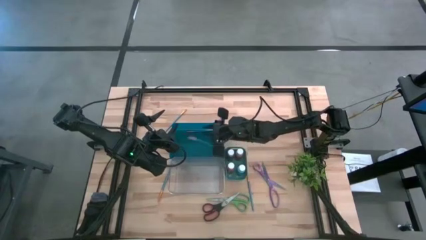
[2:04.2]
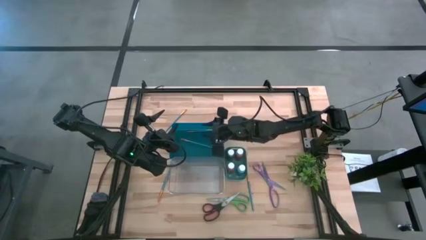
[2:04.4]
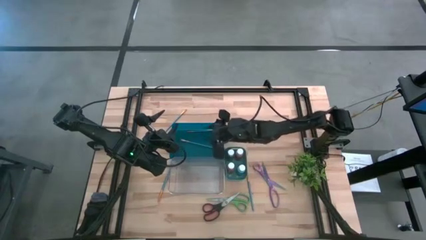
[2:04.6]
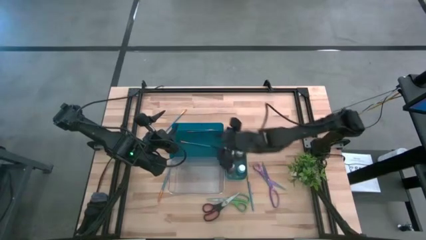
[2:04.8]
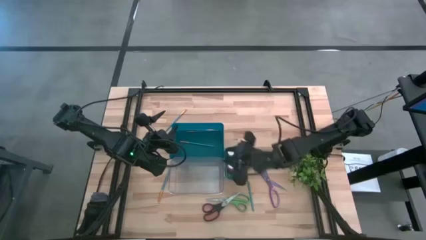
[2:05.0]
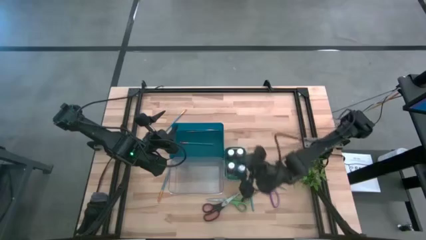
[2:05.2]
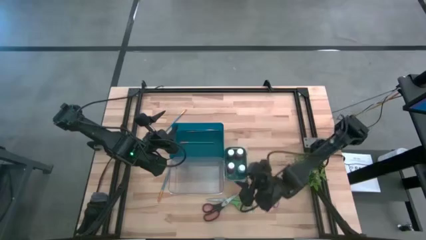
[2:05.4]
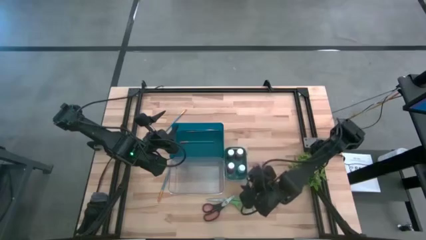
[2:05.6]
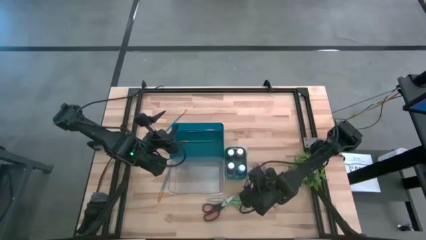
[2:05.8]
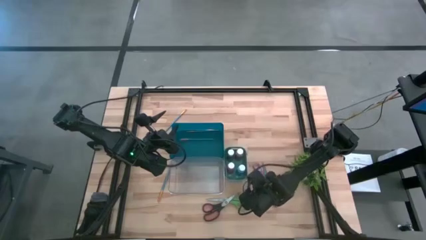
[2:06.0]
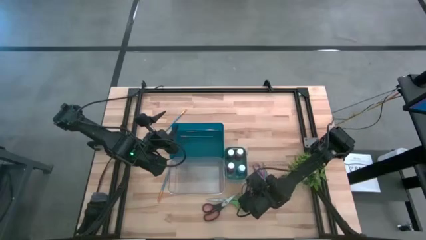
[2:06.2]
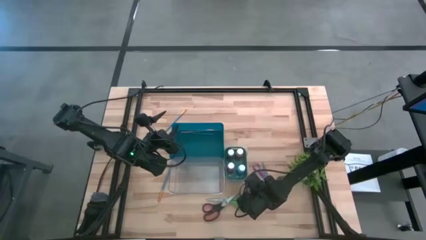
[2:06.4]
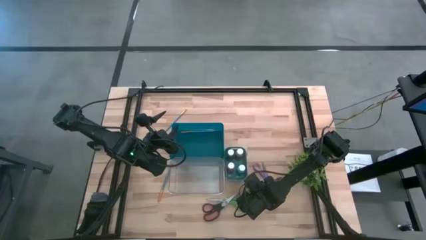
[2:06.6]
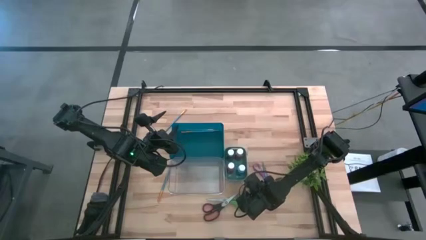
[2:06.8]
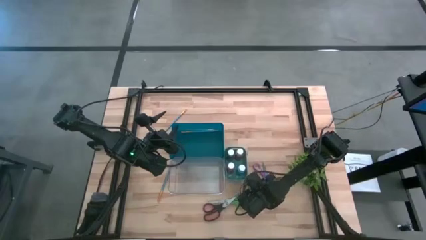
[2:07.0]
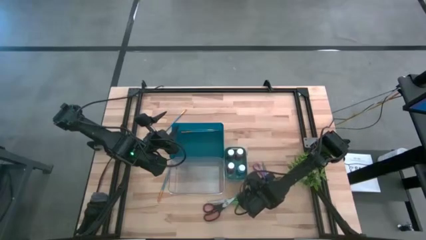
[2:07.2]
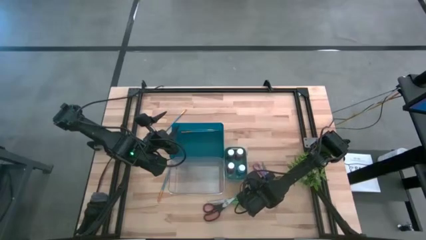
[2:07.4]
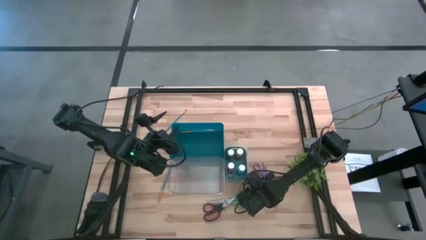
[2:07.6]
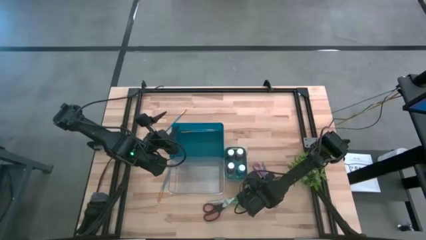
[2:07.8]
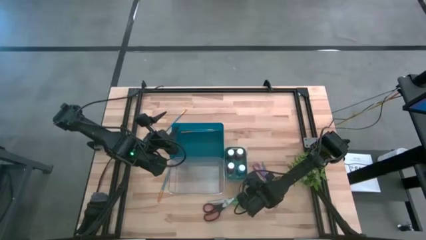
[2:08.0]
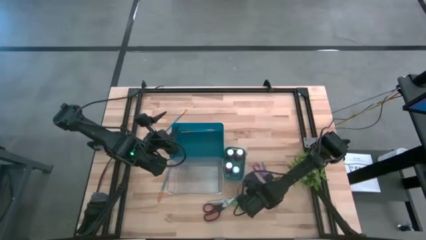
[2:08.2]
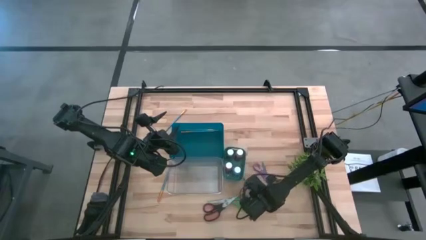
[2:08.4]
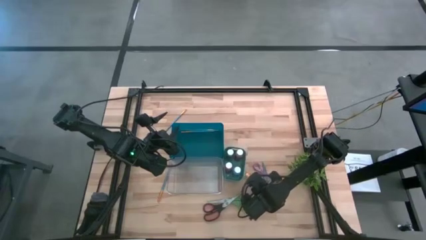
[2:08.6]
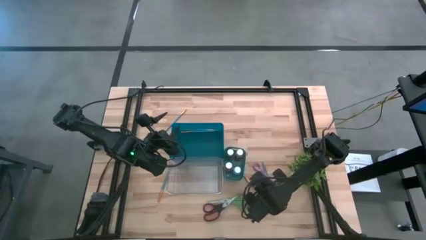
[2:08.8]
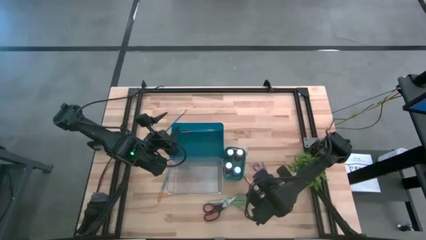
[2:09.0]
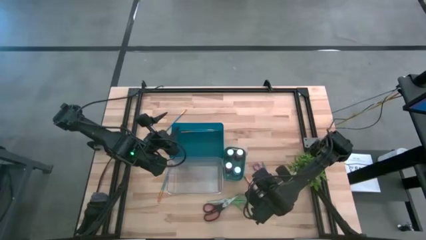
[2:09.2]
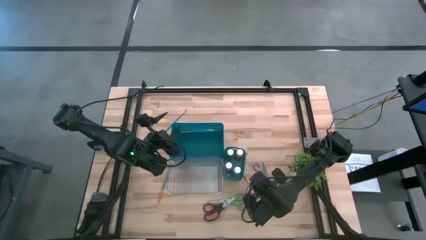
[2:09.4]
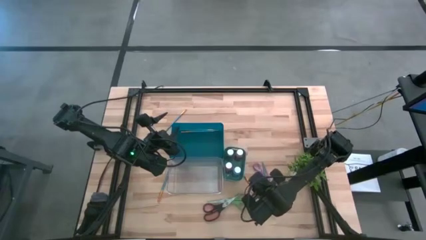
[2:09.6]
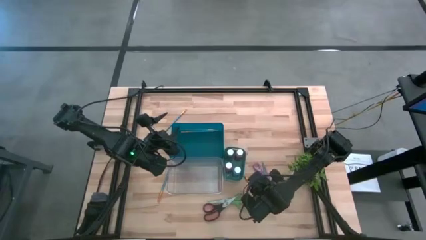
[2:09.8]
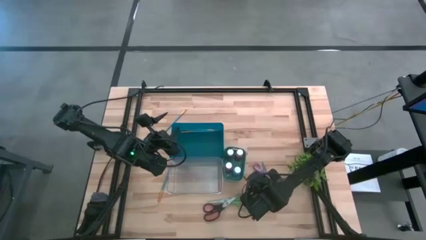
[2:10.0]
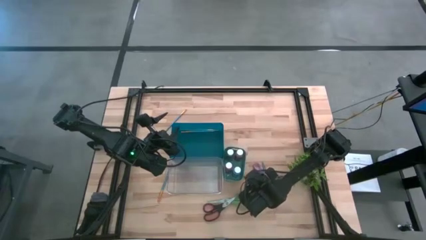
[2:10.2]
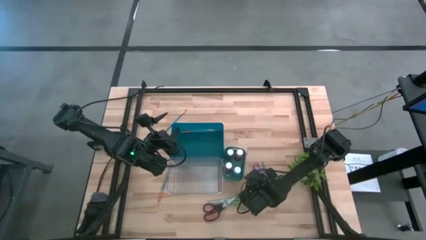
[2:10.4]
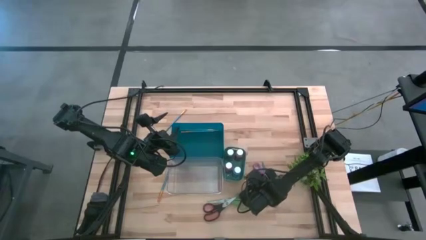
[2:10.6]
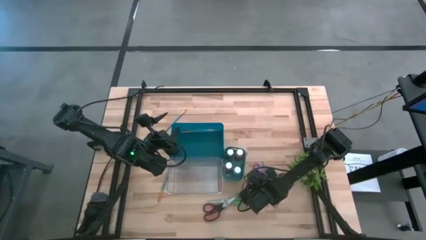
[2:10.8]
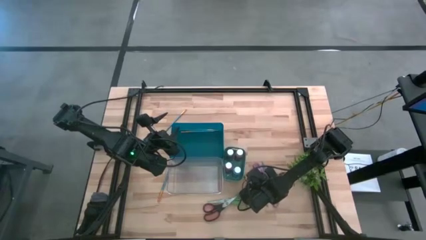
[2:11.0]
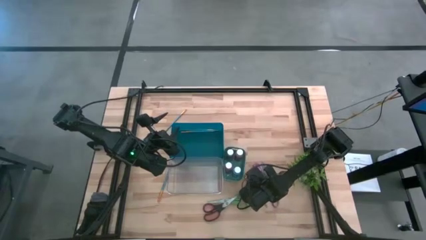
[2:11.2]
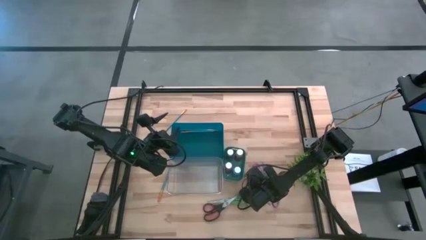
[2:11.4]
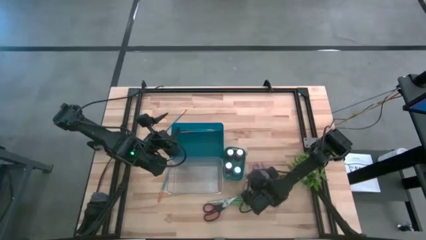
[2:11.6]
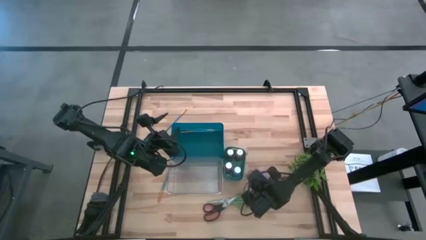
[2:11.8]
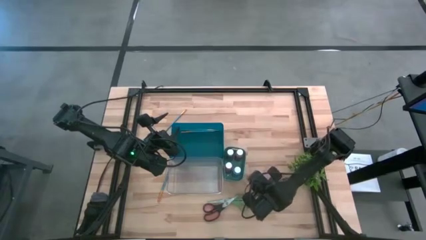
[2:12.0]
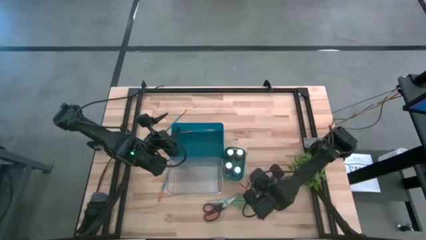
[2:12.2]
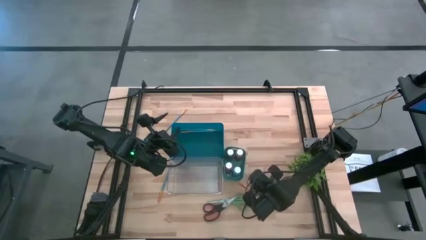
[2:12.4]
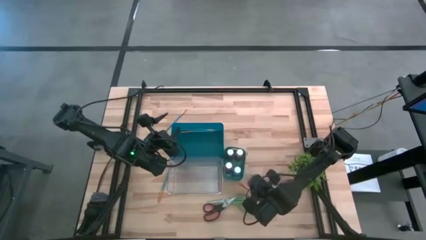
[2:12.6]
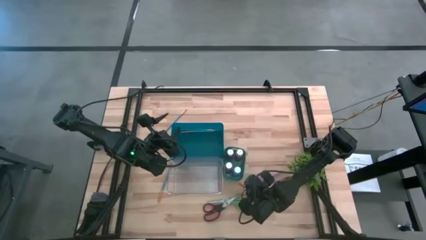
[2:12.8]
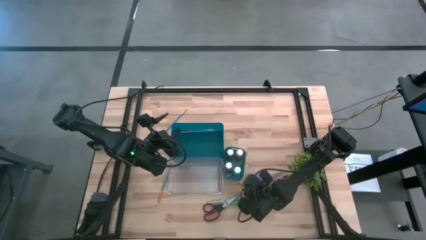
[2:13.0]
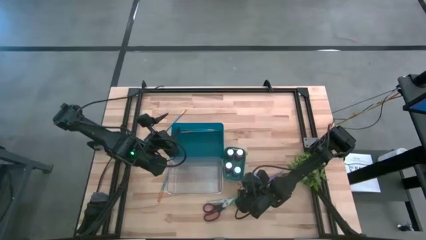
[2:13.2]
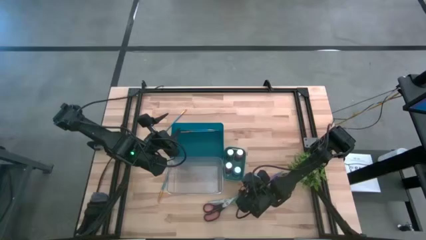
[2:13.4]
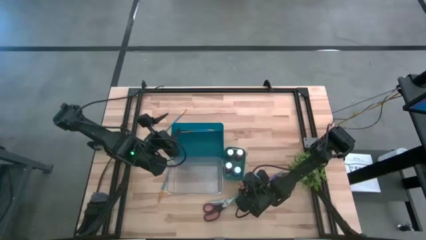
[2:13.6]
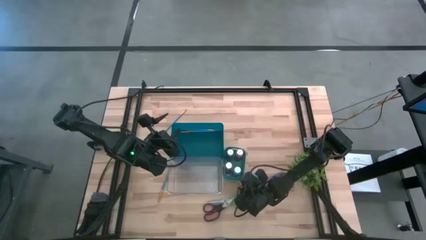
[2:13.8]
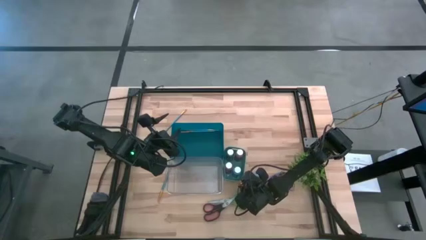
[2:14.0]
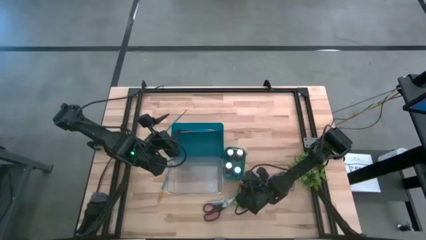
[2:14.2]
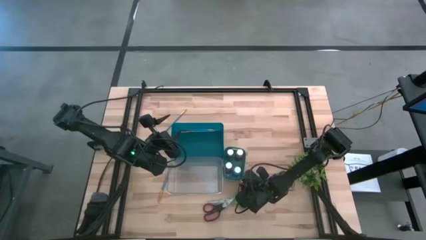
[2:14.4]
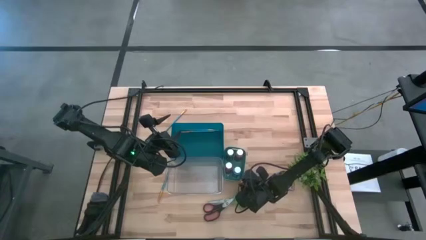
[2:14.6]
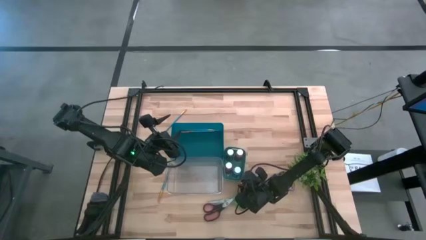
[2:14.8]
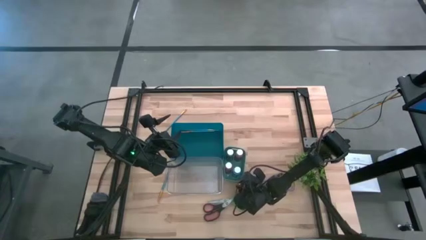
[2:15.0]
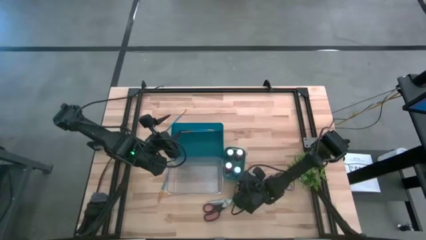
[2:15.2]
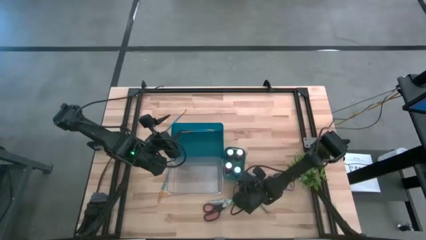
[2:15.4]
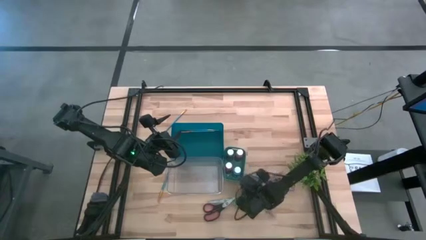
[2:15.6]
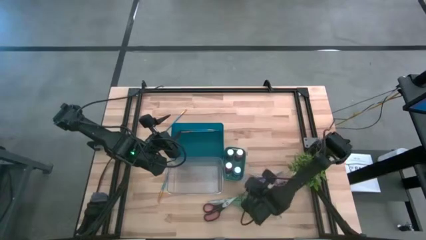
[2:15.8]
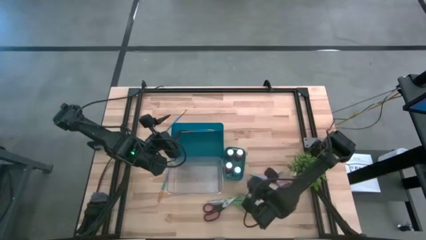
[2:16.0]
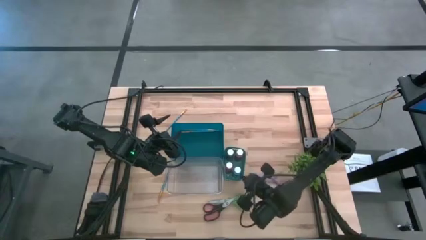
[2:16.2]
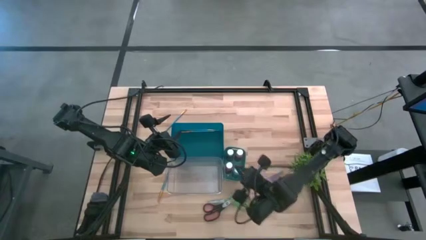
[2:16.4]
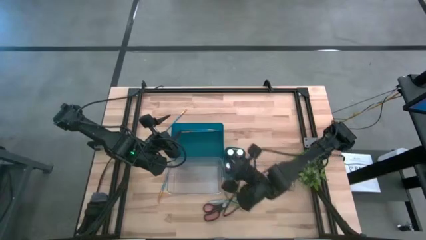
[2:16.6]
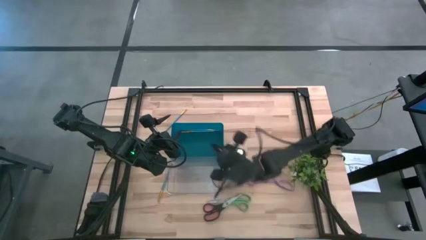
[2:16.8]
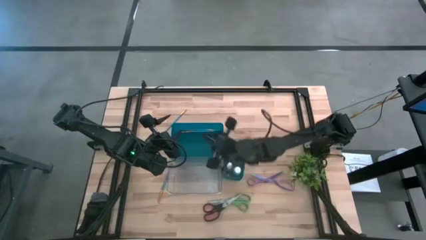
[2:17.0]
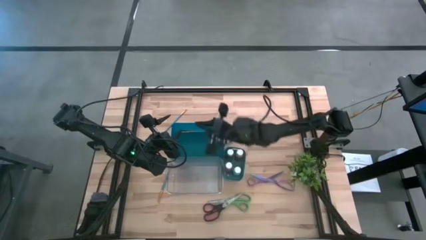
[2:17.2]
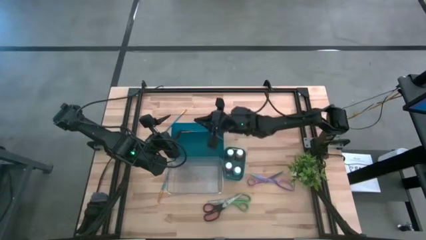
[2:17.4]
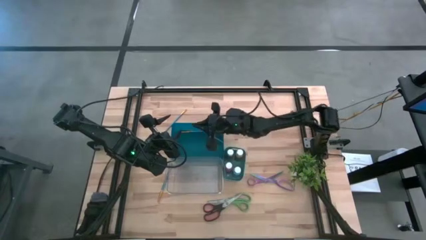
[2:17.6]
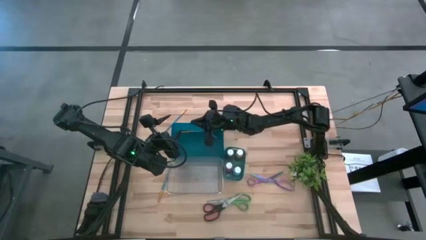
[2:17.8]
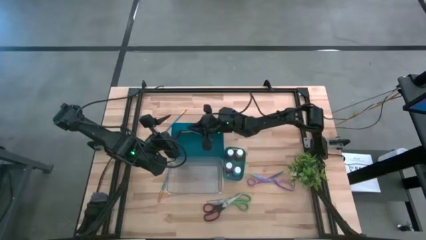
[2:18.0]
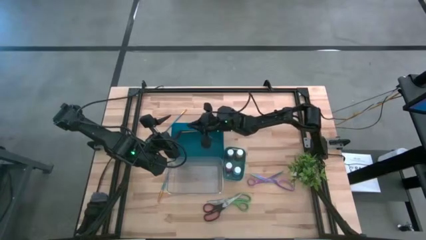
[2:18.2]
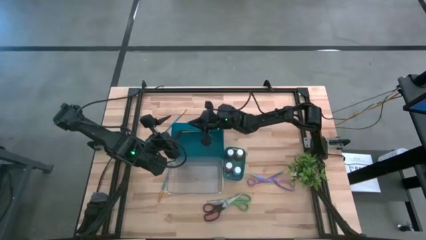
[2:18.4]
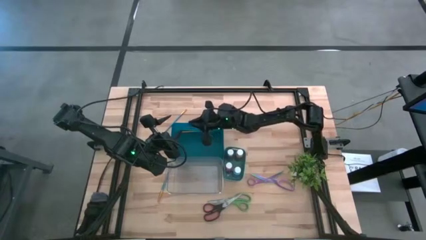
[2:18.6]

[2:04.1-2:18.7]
Task: Pick & Place Paint Supplies
Put the blue paint brush into the blue bin
